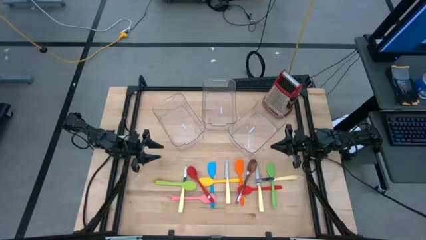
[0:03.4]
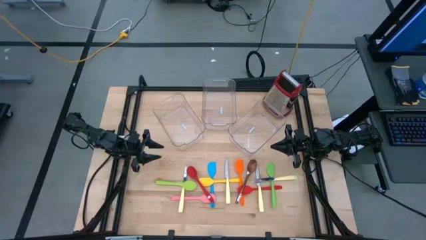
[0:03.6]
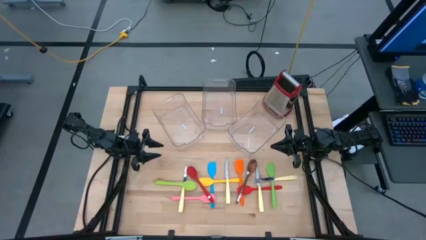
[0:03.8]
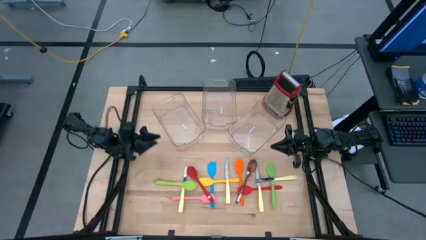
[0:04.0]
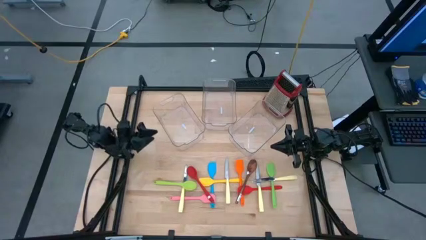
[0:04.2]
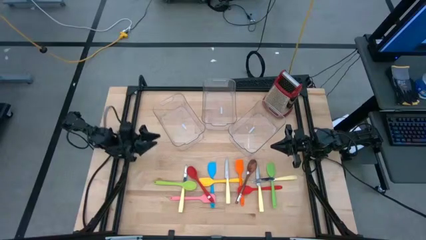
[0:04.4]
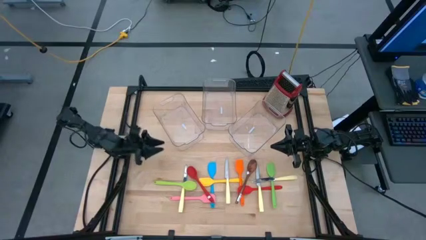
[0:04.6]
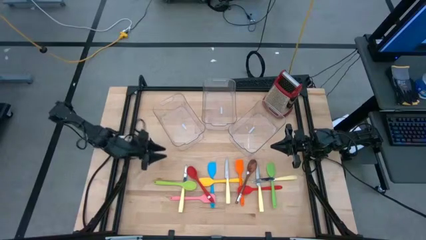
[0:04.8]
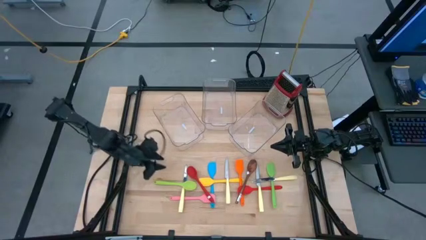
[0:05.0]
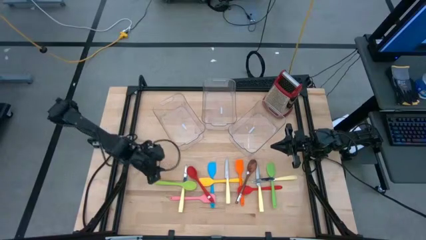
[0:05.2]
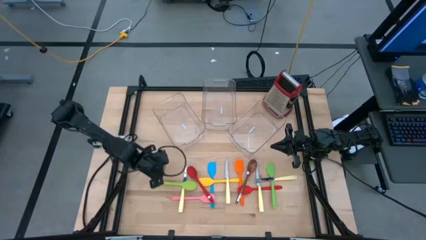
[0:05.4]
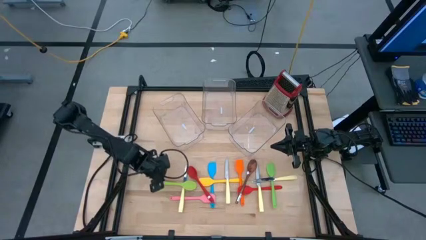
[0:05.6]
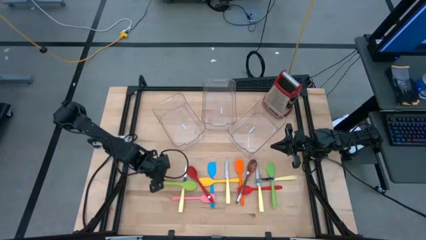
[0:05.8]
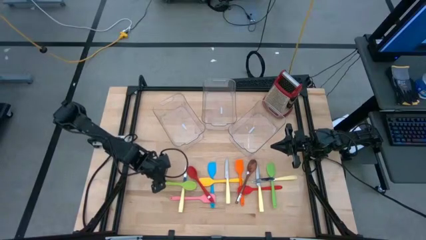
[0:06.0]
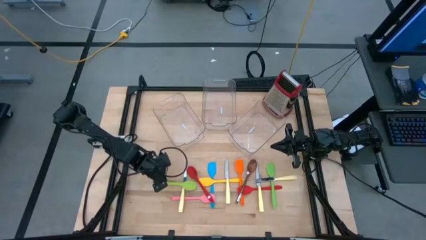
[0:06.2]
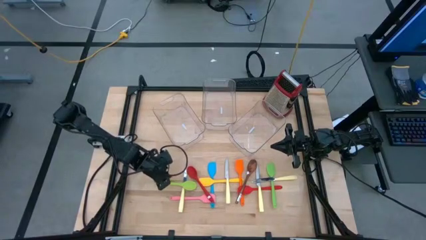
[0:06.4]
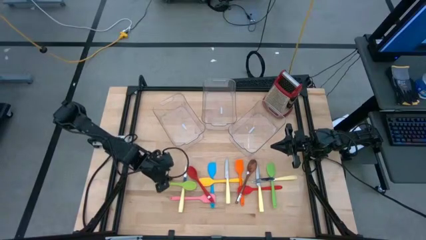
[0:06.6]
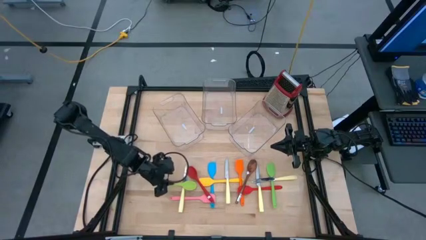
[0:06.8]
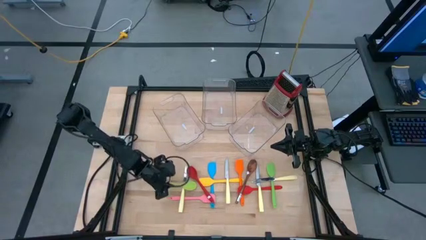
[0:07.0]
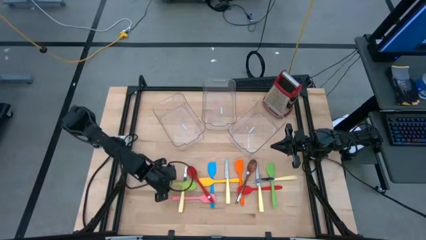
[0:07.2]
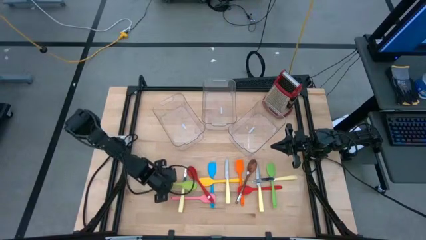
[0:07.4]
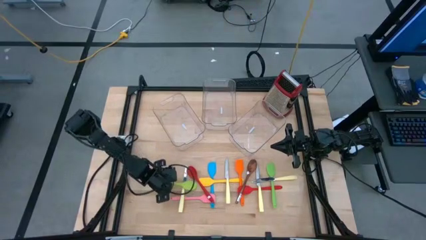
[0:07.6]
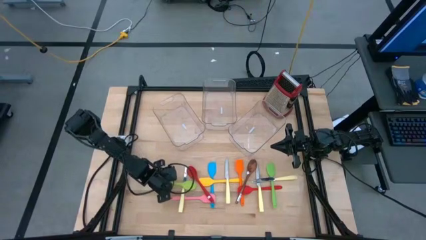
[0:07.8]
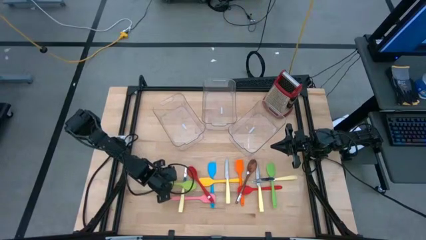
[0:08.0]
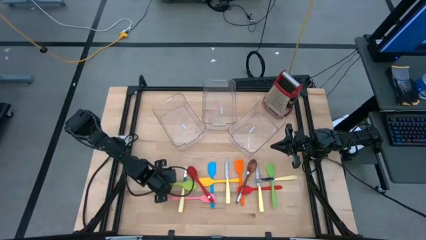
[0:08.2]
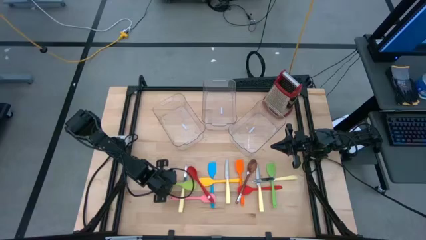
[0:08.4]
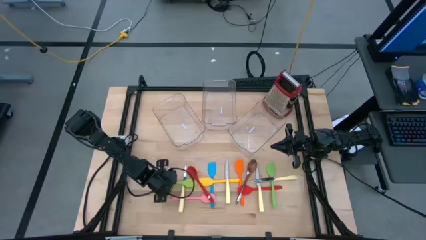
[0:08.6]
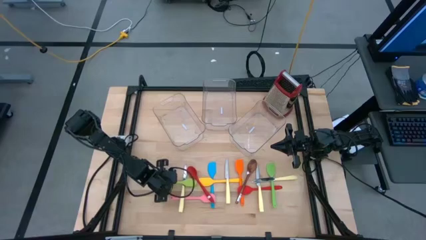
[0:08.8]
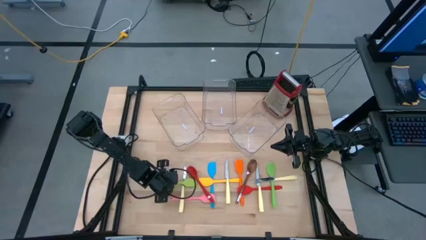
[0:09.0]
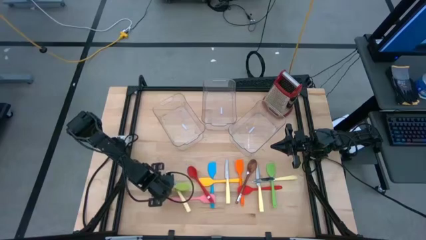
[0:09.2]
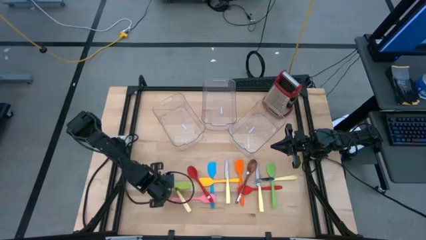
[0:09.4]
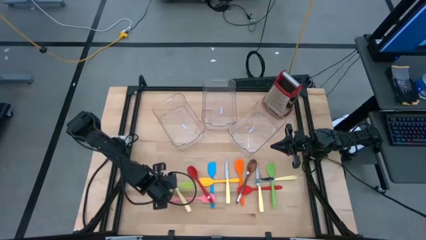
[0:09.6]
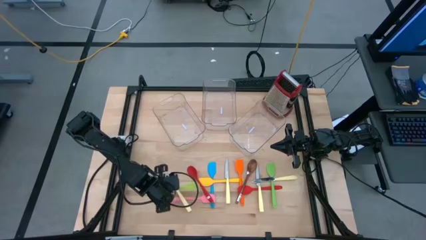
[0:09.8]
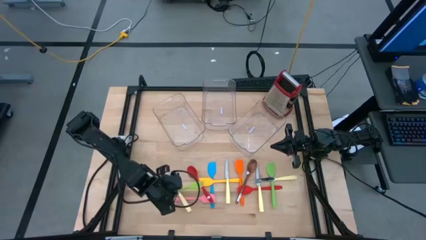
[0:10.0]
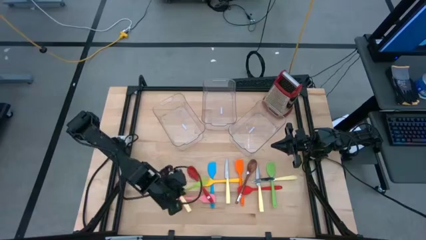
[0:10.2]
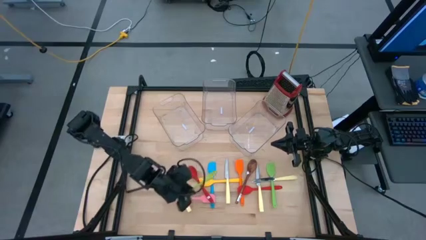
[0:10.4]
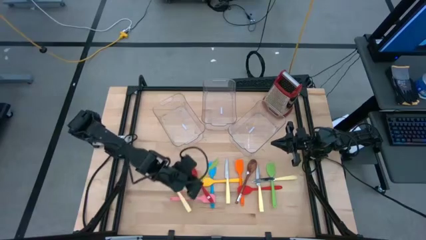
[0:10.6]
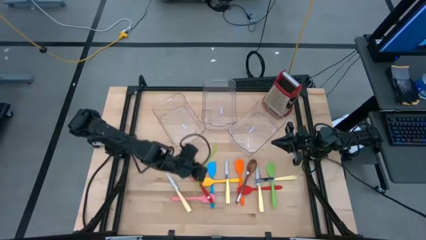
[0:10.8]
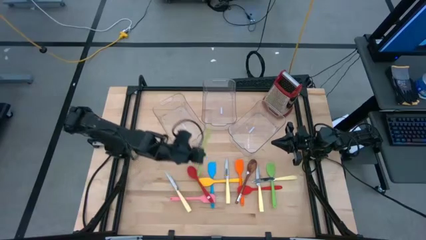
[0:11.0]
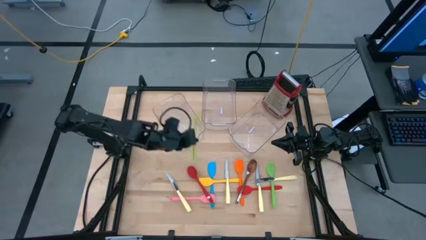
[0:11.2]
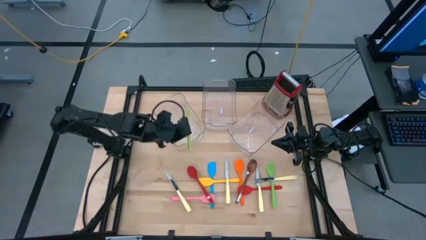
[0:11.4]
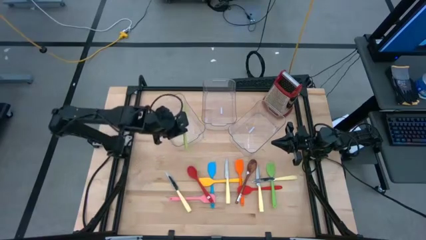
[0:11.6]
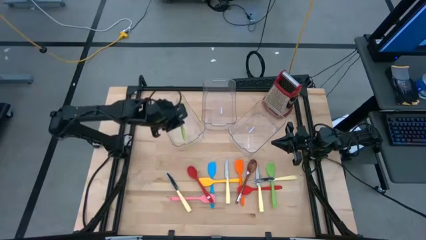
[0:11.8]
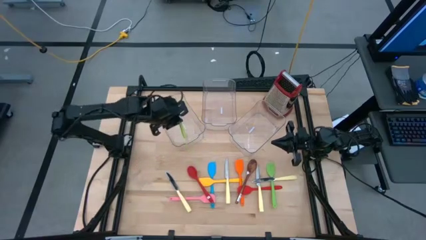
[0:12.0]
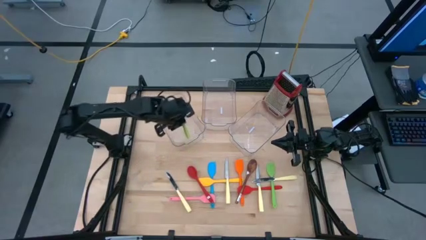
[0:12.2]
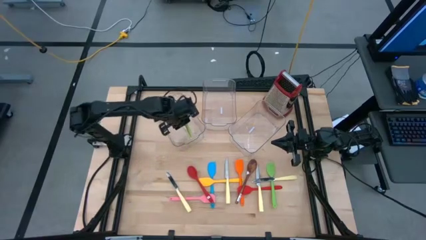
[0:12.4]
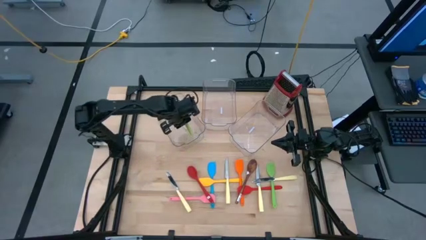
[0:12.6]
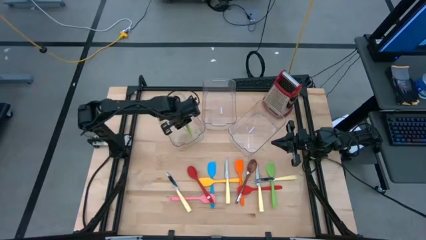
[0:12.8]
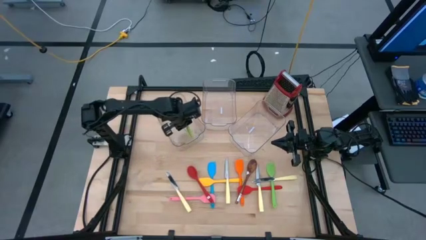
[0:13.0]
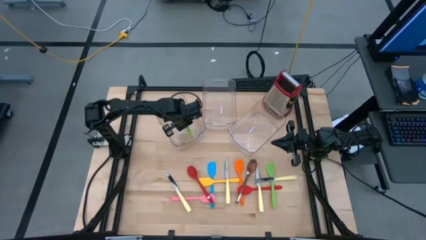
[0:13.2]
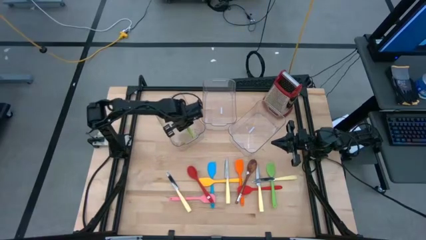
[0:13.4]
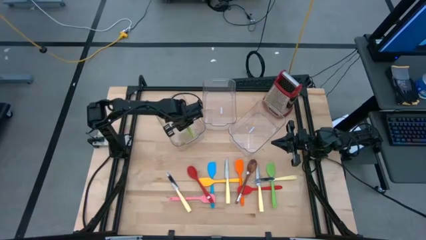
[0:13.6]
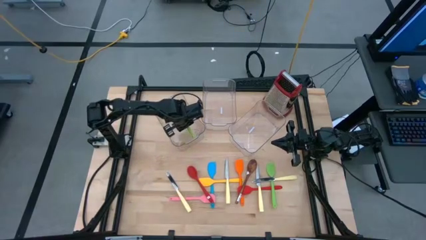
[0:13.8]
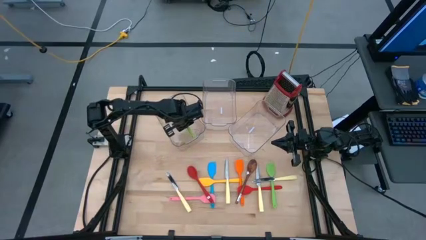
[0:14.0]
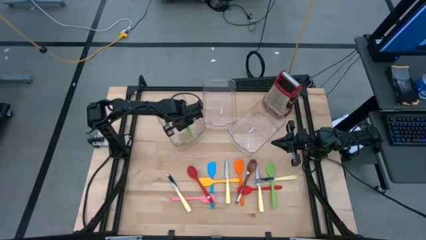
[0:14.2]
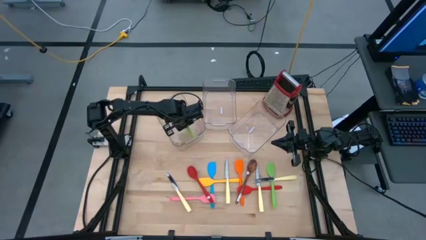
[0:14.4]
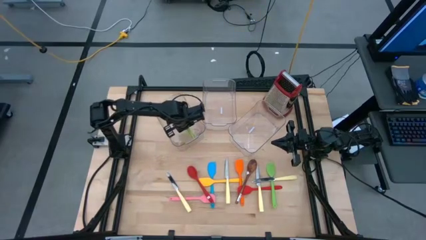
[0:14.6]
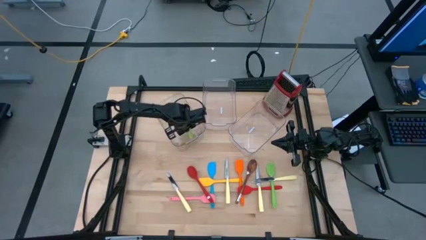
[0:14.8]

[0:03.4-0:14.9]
Task: Pick & Place Kitchen Items
Put the green serving spoon into the left transparent bin

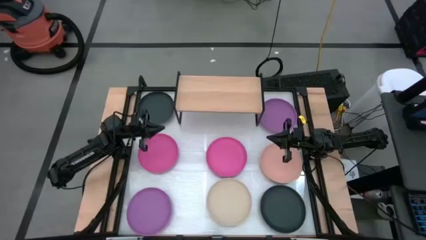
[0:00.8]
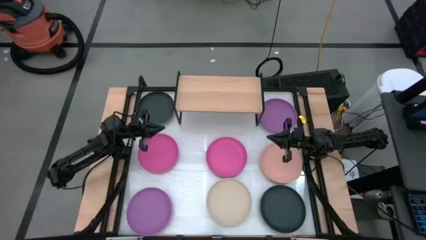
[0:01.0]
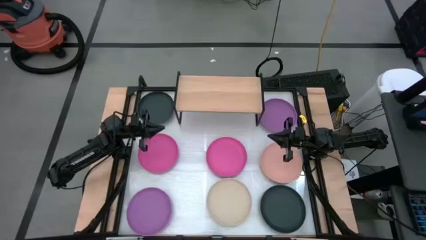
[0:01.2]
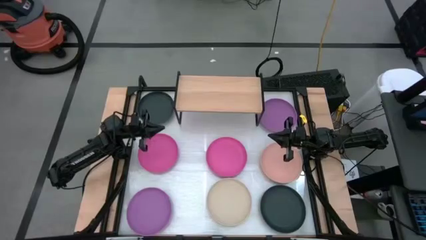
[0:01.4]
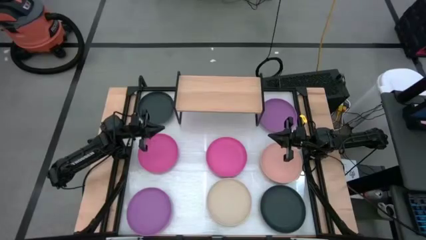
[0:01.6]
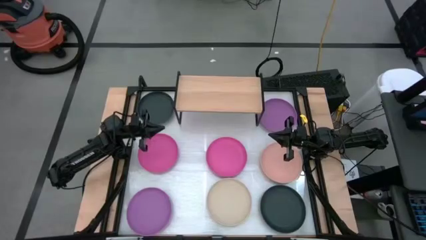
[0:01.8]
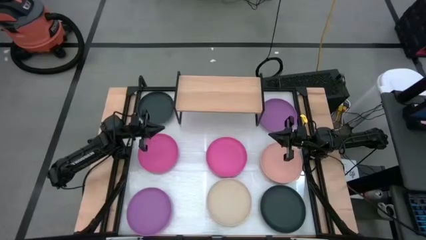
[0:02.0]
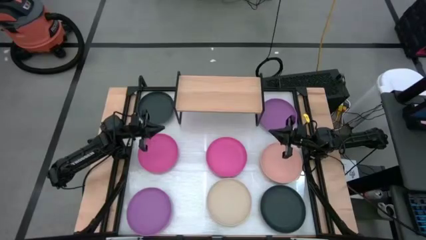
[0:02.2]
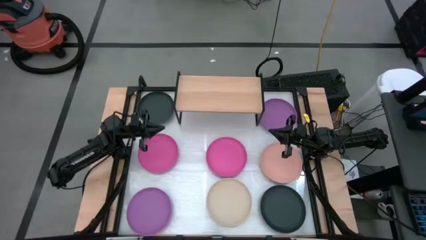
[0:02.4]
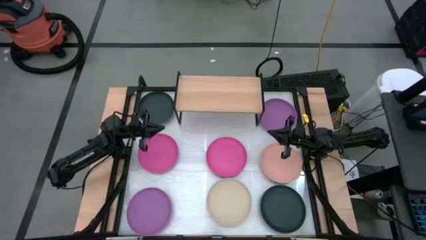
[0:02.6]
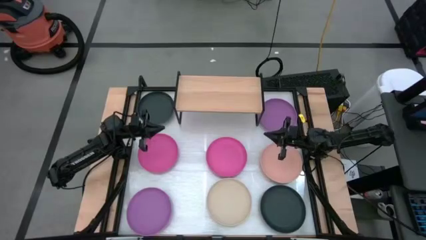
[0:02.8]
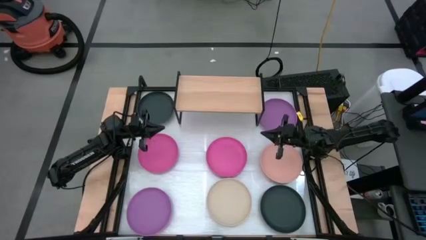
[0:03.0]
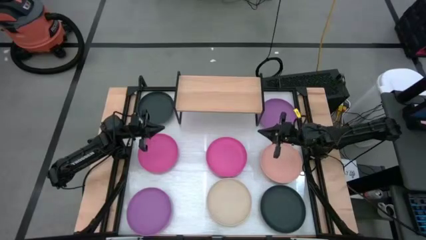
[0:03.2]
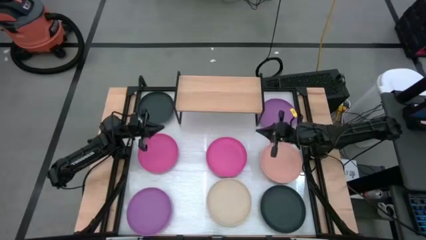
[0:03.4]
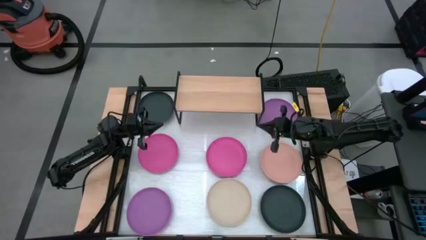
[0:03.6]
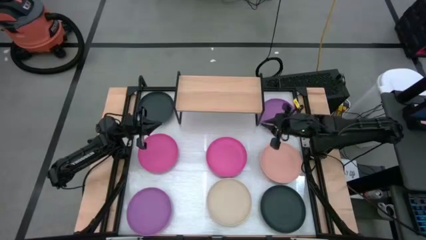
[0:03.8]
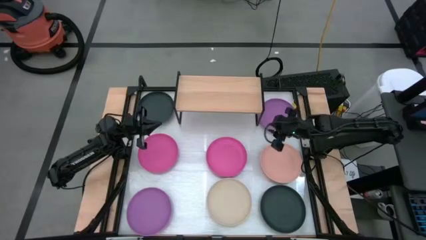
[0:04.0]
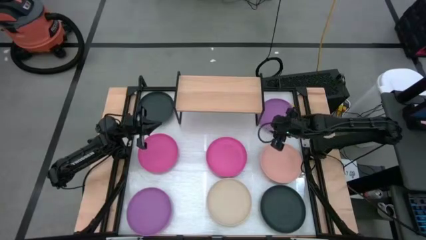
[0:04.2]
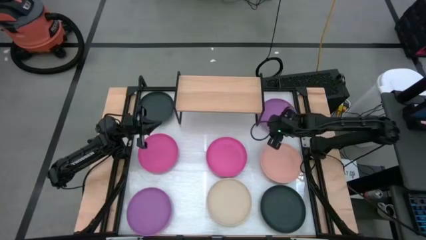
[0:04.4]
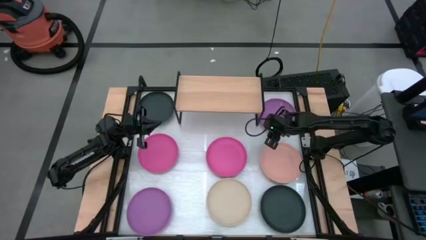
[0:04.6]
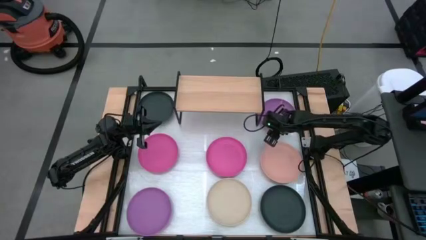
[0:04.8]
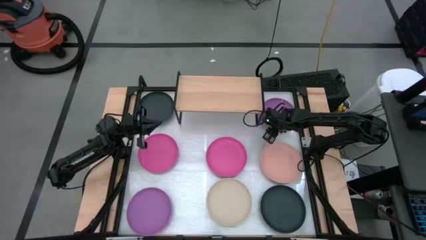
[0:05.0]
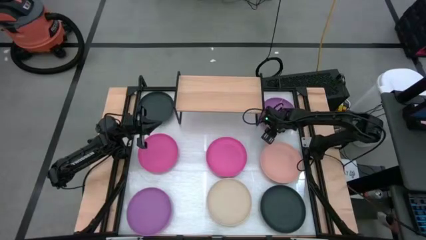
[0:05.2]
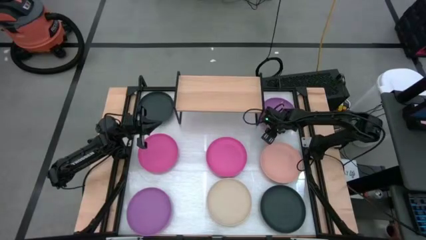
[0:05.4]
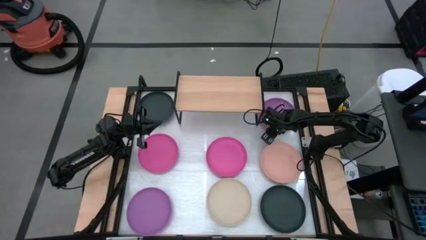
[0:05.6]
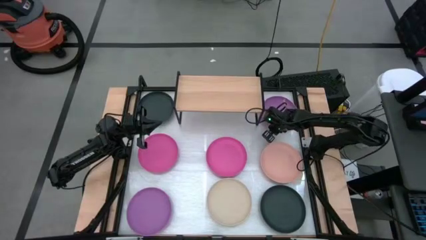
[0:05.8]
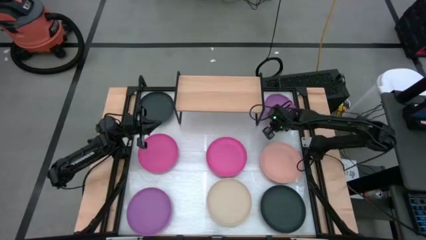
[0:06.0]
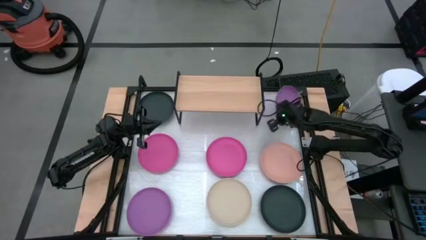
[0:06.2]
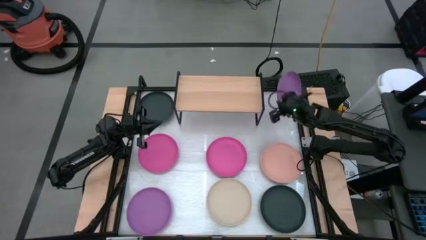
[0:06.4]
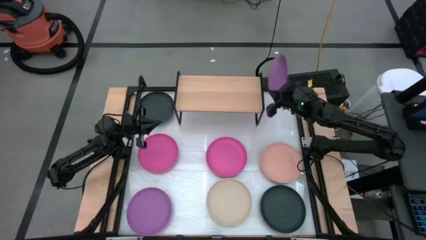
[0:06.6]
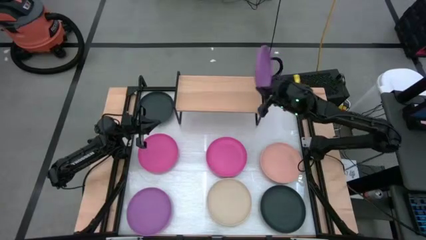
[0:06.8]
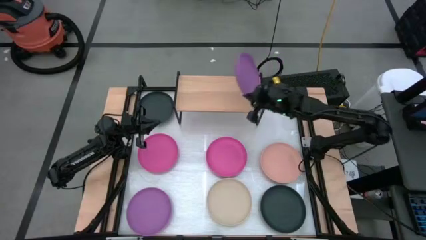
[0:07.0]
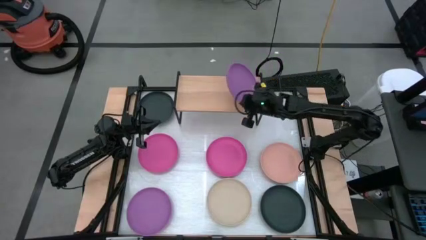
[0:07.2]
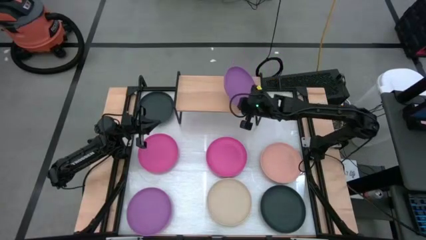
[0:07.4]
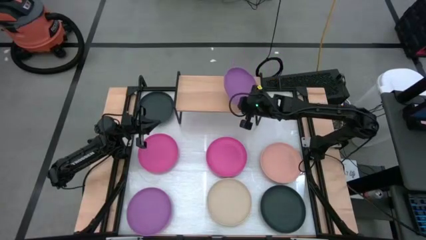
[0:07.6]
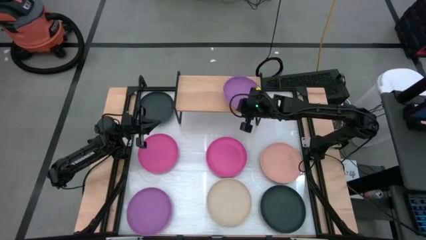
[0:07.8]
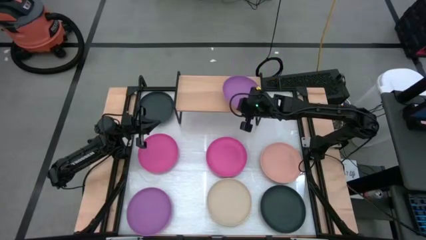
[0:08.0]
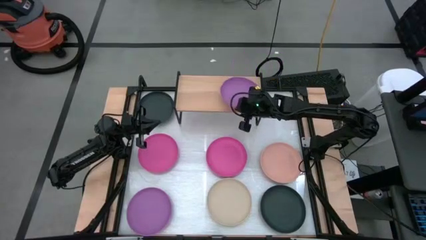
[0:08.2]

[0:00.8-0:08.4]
Task: Place and stack plates onto a shelf
Put the right purple plate on the shelf
